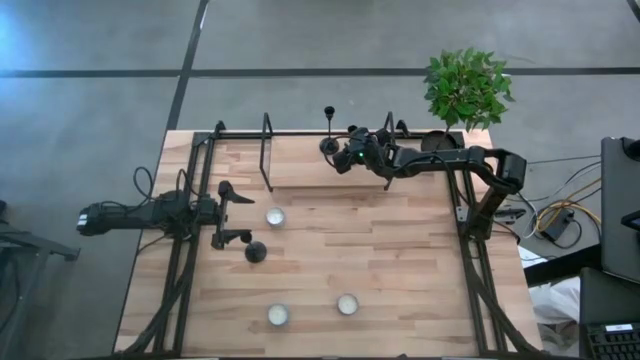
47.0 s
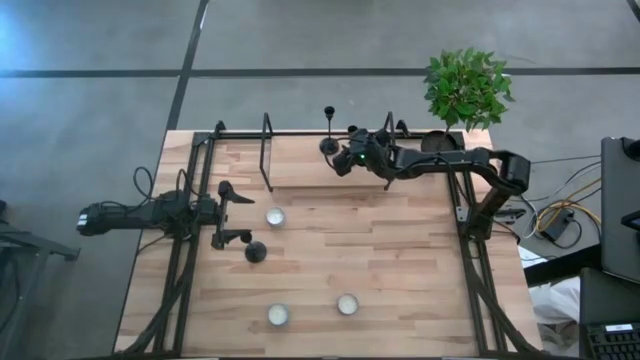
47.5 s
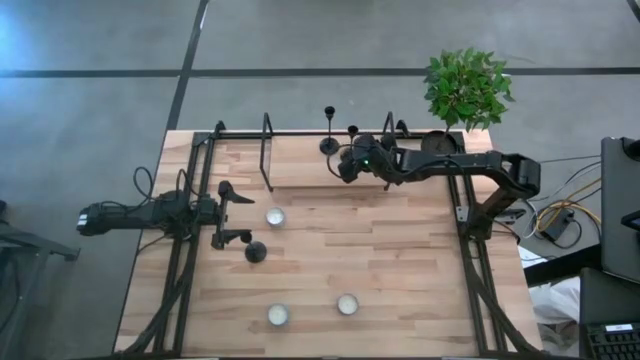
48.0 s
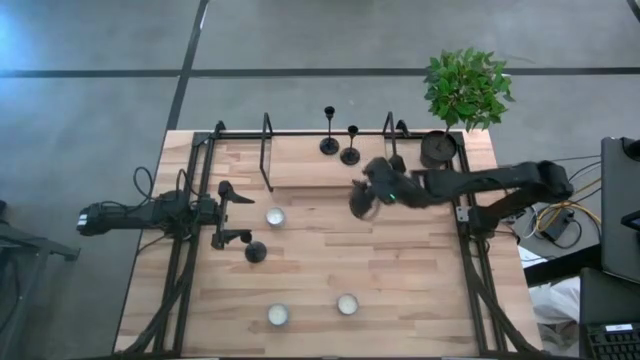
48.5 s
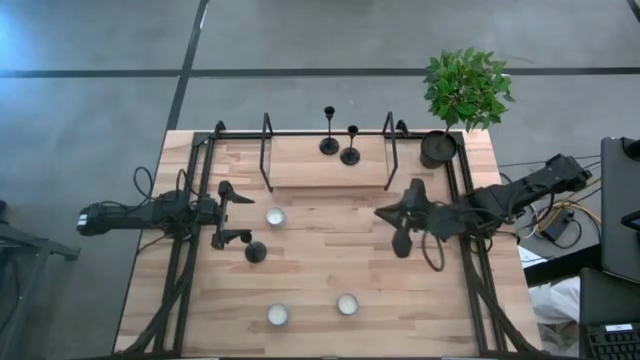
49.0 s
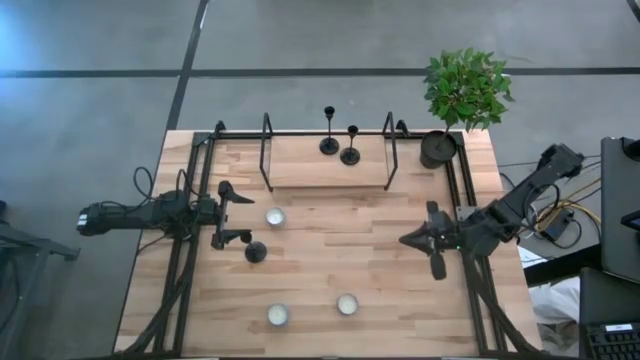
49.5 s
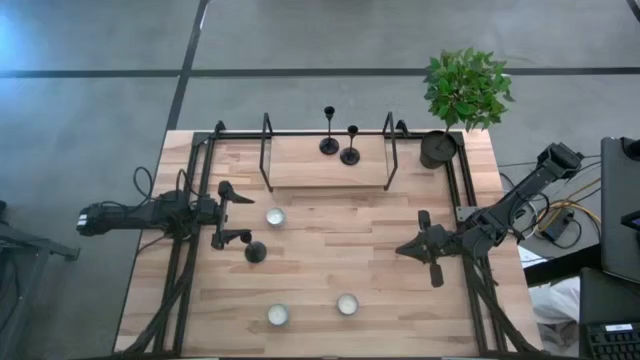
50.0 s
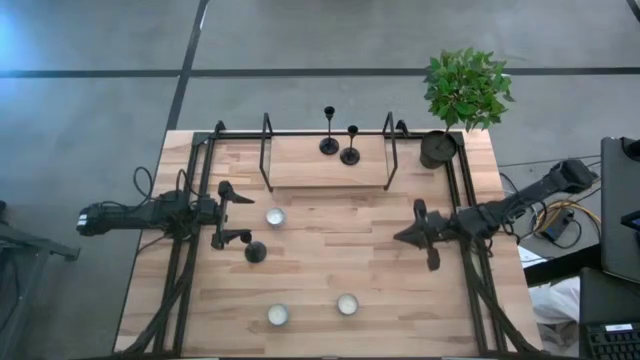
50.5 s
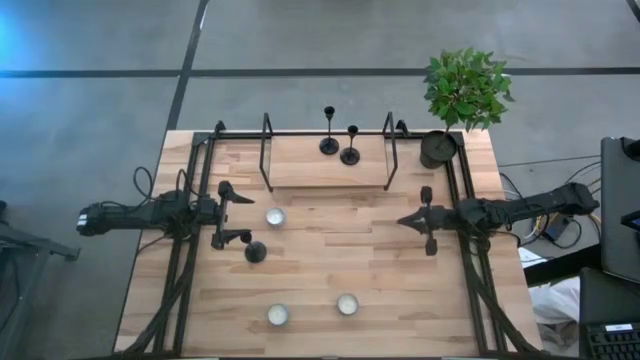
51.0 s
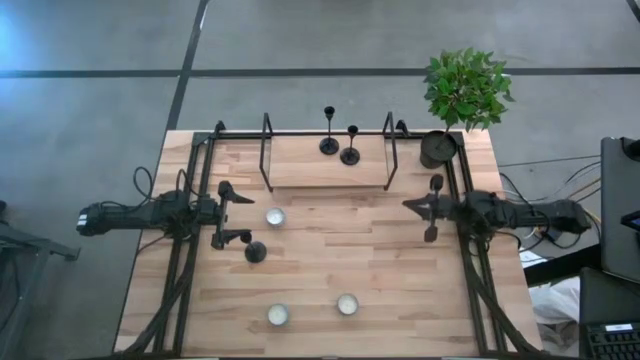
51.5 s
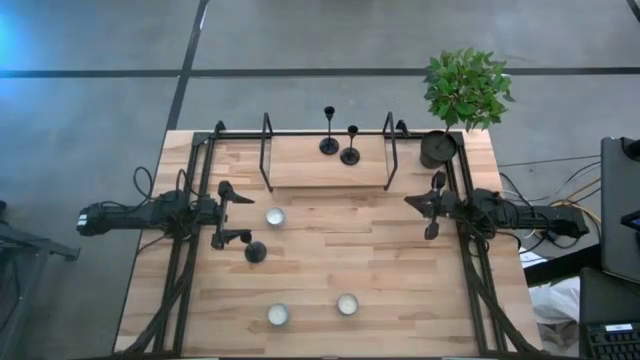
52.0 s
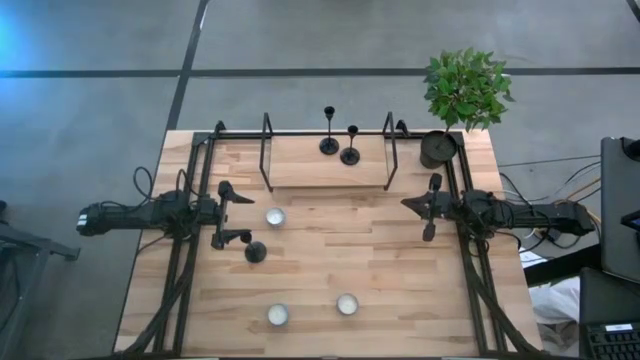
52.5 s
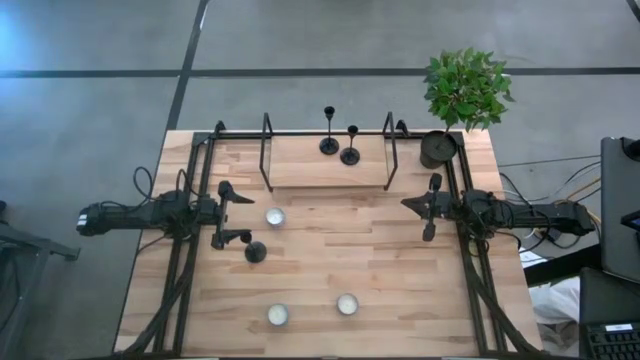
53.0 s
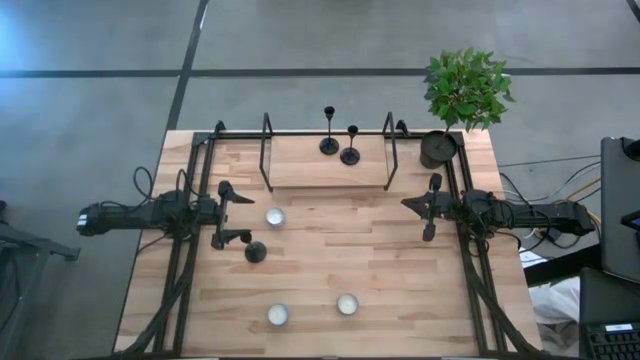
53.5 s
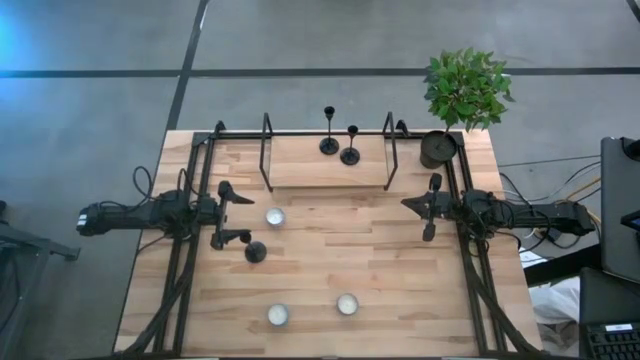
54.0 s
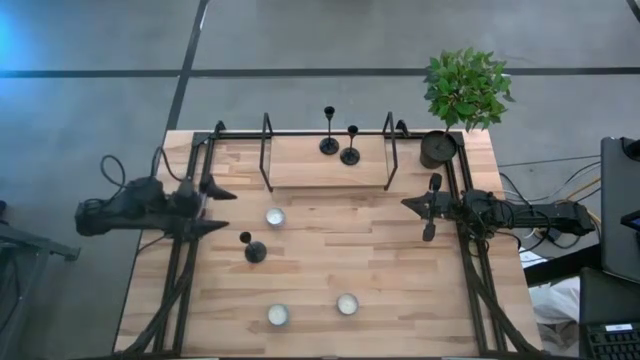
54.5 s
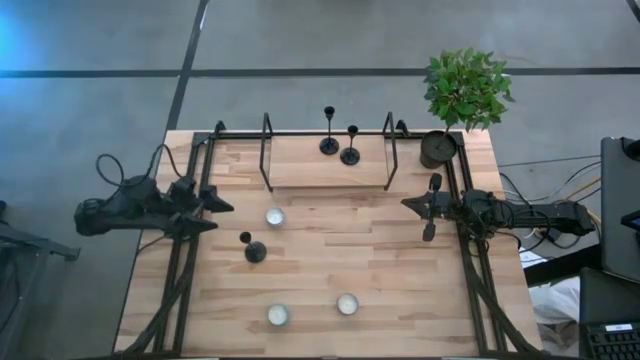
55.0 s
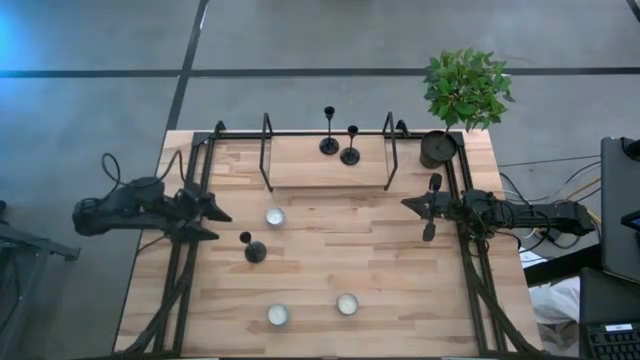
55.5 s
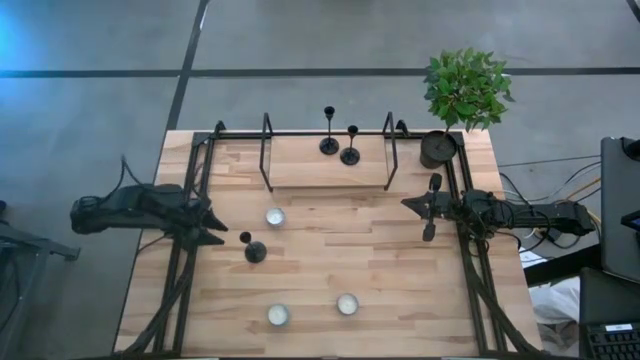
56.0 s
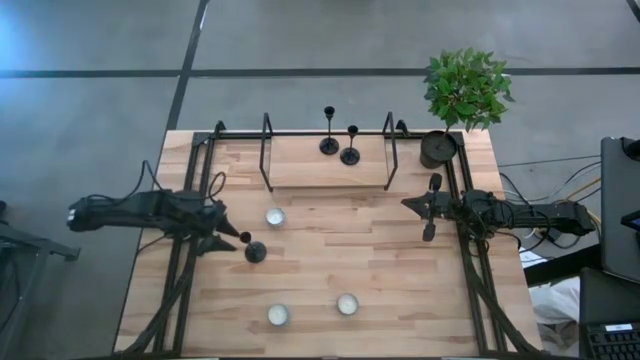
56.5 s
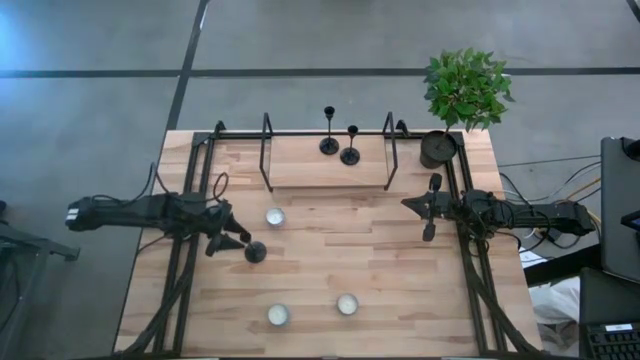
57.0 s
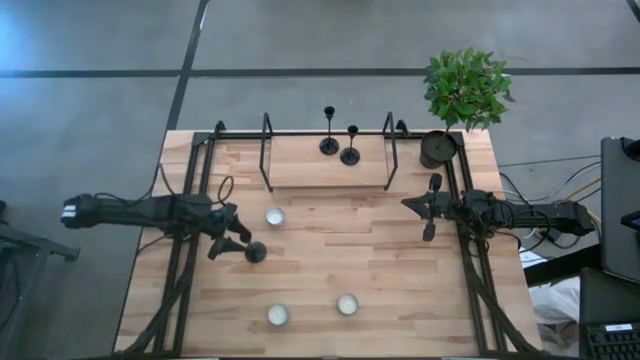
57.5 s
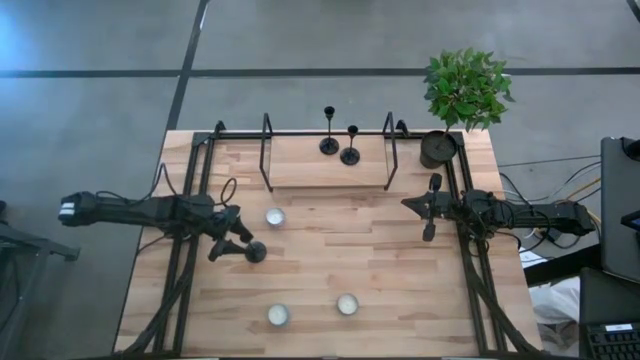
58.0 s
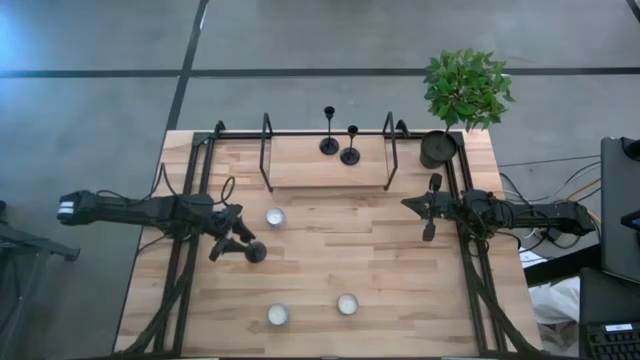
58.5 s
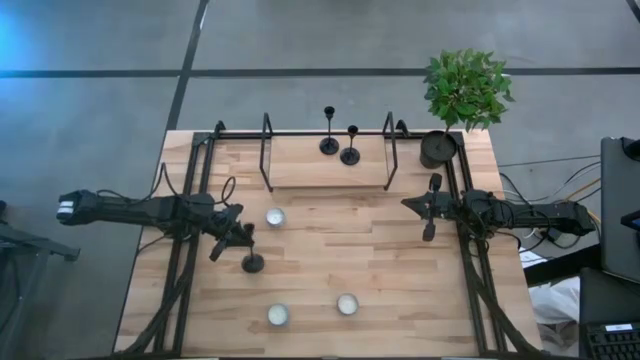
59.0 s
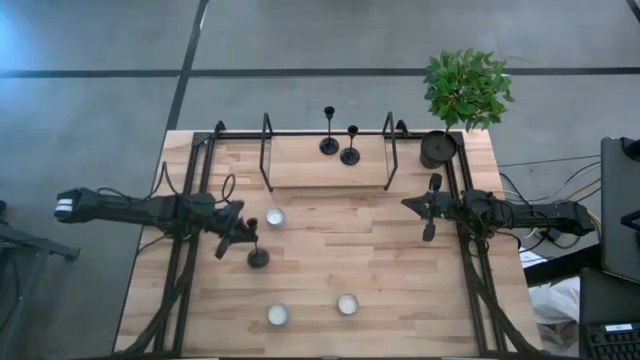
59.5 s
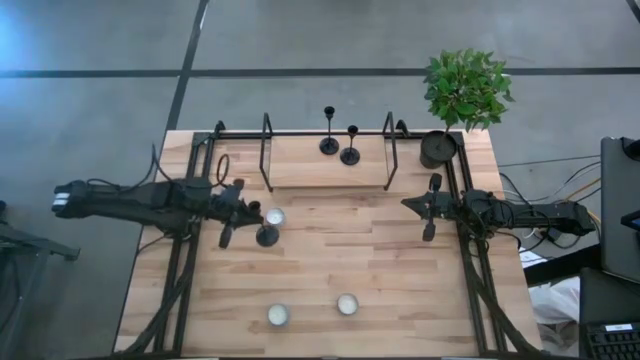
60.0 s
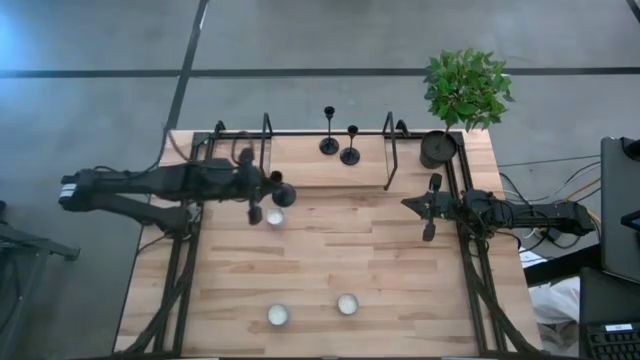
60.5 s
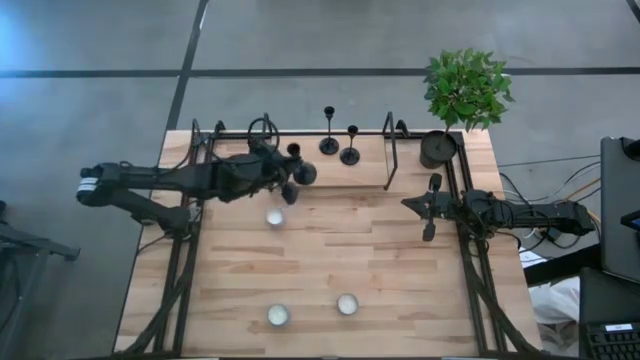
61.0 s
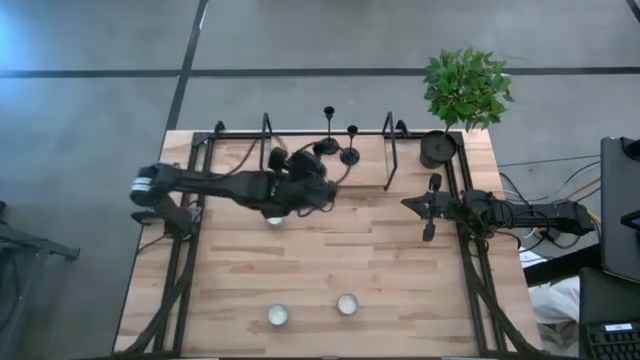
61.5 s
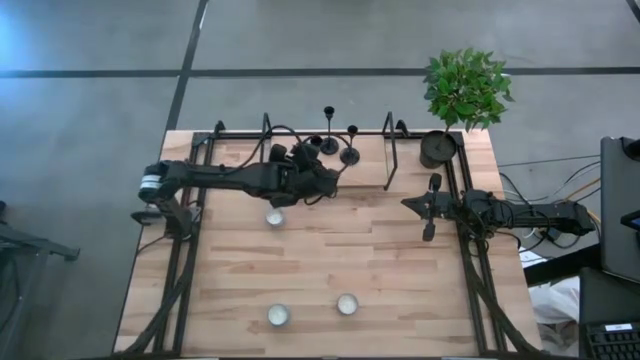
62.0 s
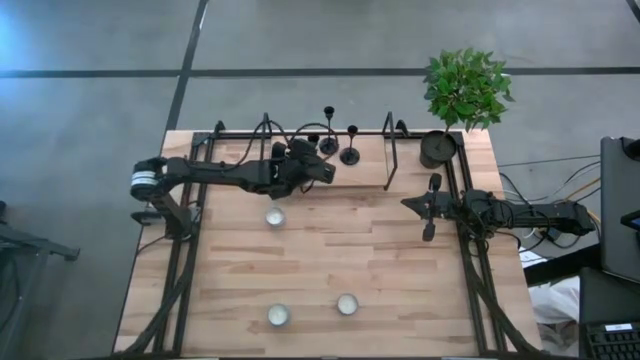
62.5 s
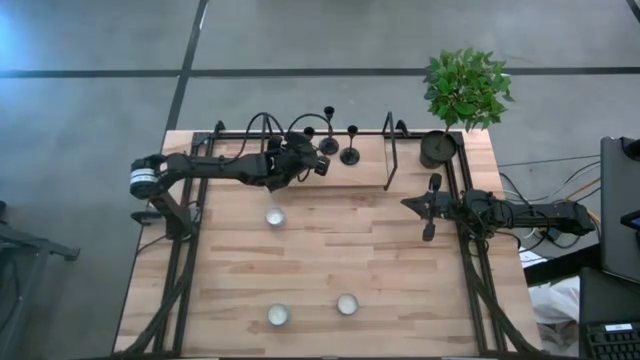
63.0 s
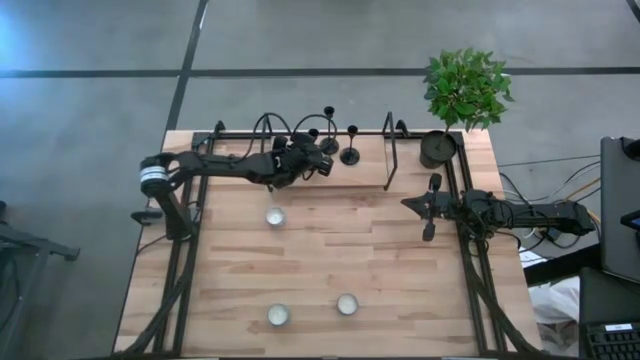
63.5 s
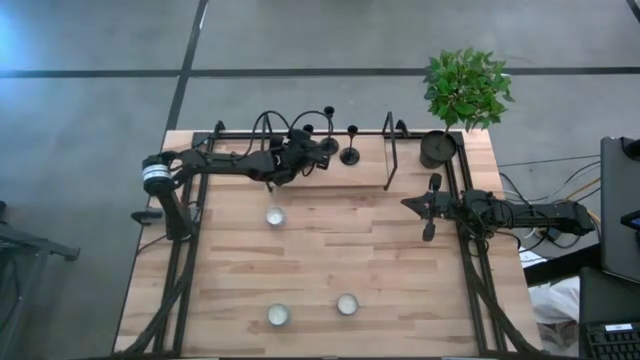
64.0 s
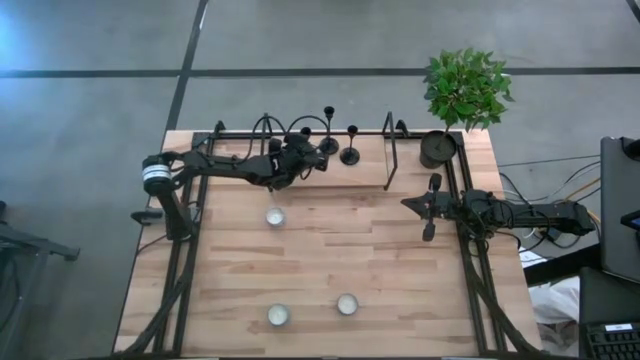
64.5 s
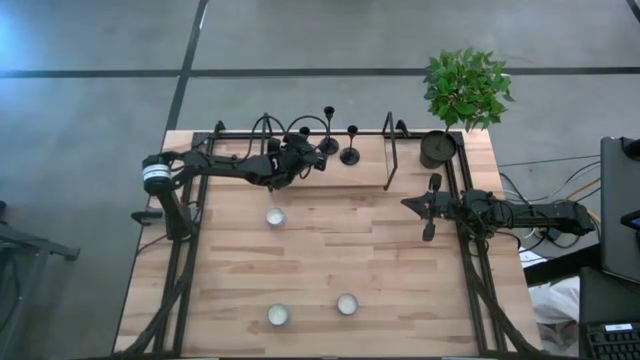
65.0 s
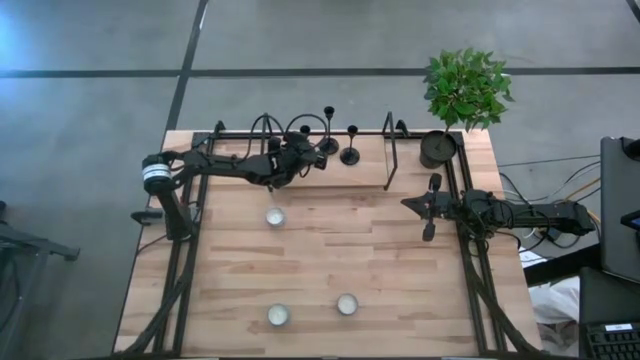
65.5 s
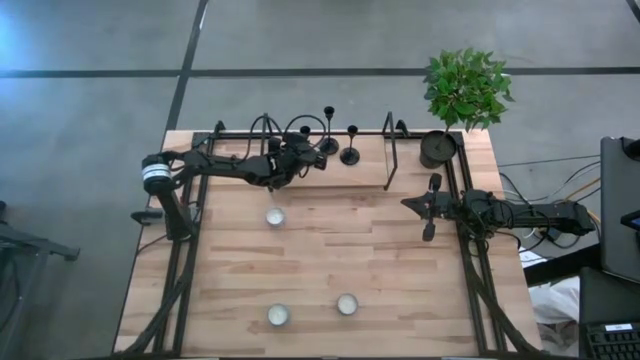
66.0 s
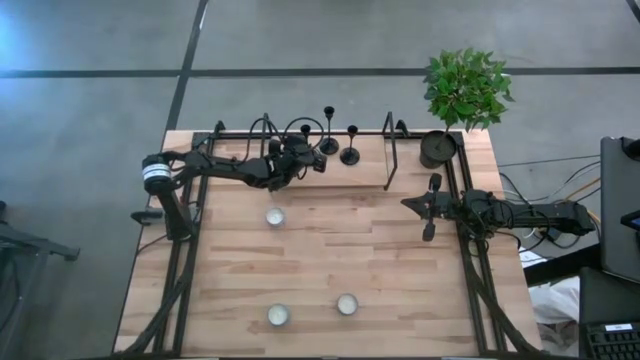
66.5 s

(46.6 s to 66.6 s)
Task: Pick & Place candle stick holders
Put the black candle holder on the shelf
